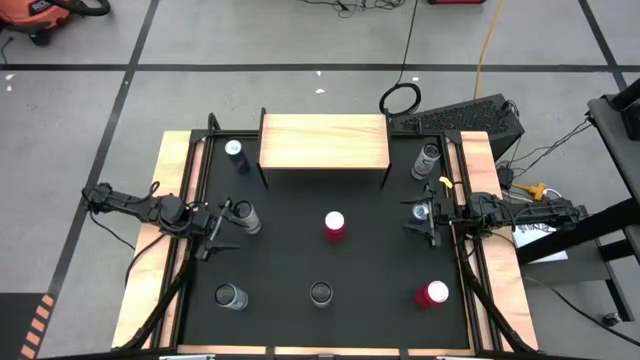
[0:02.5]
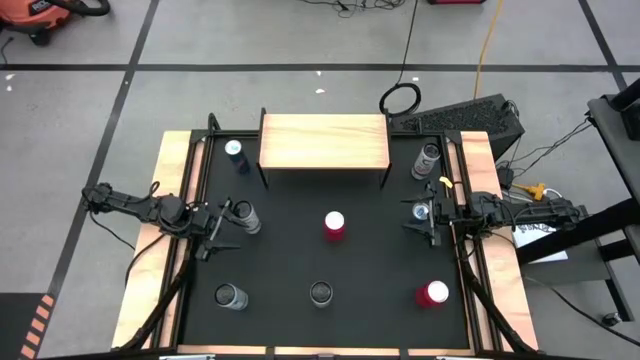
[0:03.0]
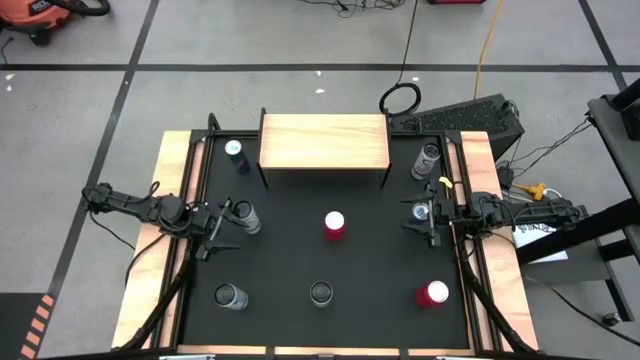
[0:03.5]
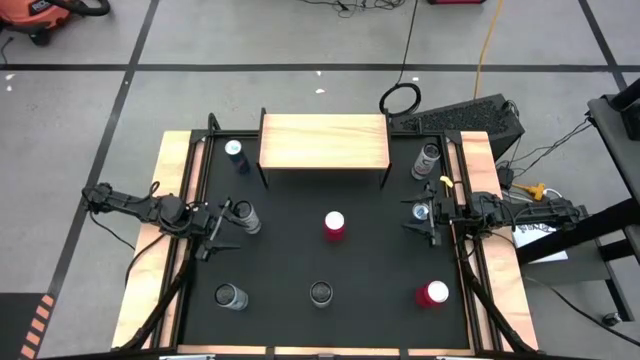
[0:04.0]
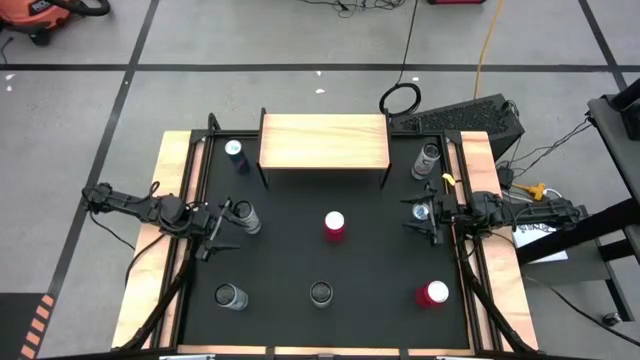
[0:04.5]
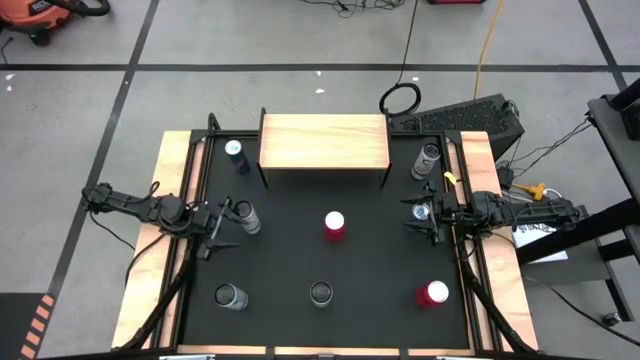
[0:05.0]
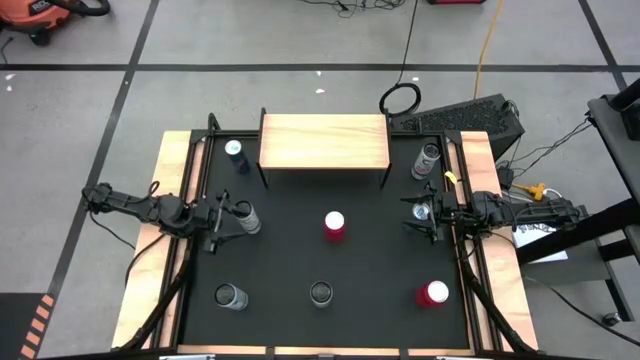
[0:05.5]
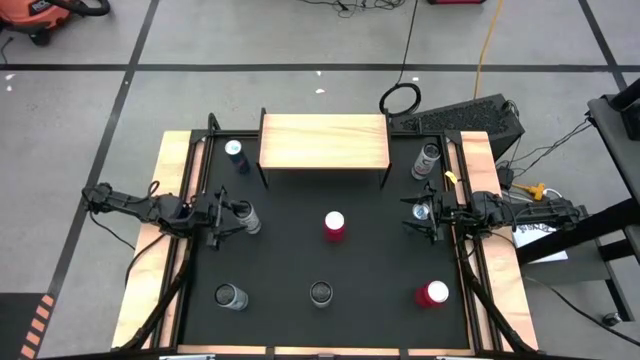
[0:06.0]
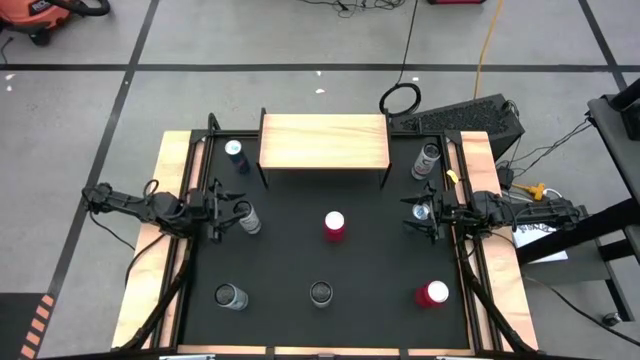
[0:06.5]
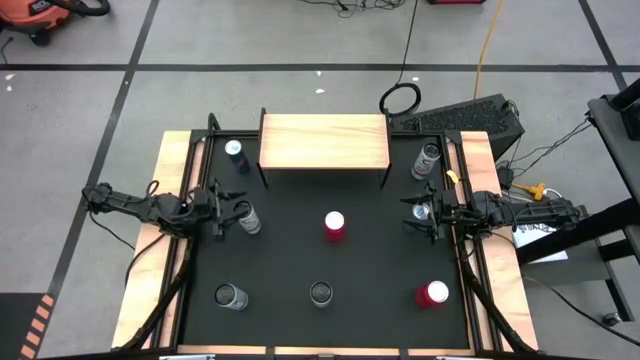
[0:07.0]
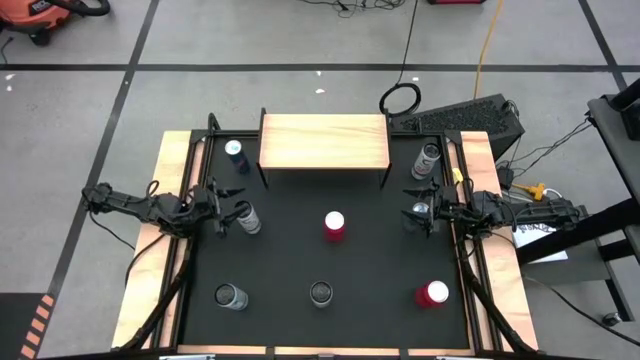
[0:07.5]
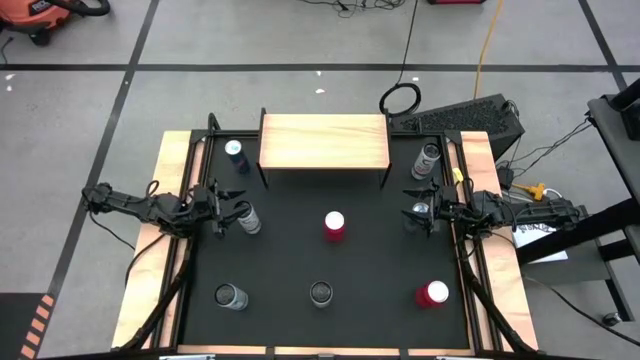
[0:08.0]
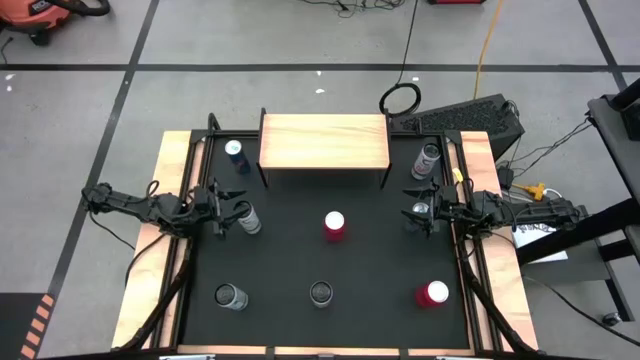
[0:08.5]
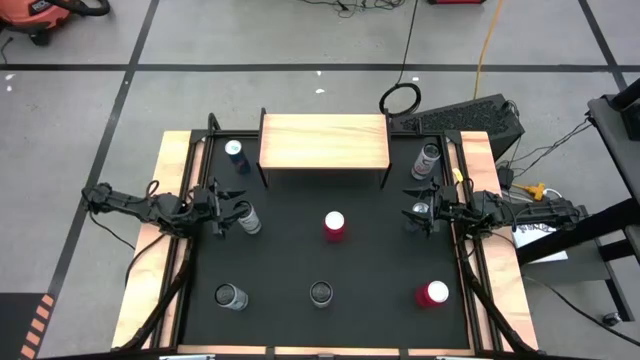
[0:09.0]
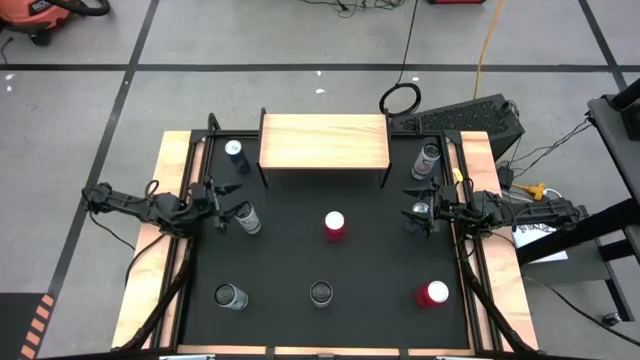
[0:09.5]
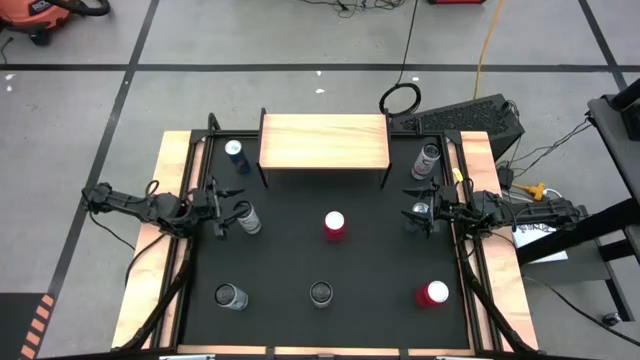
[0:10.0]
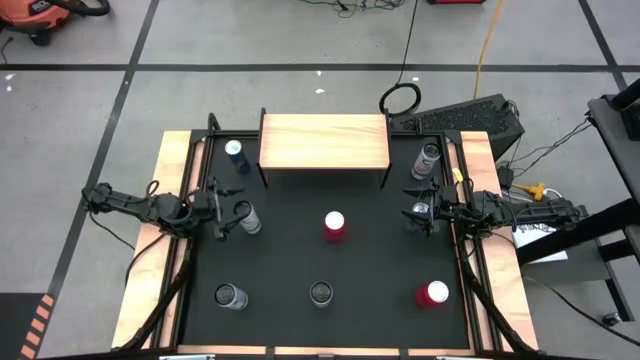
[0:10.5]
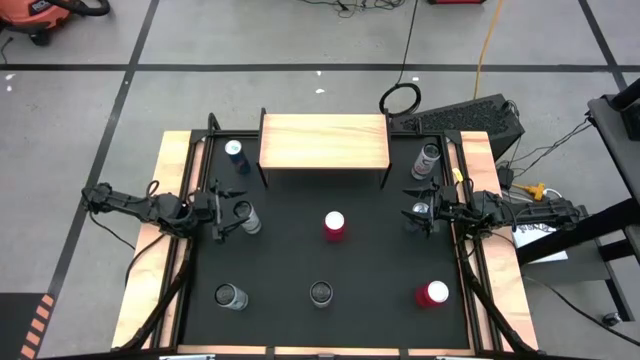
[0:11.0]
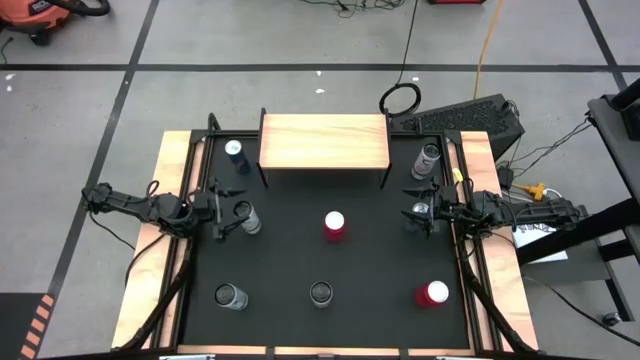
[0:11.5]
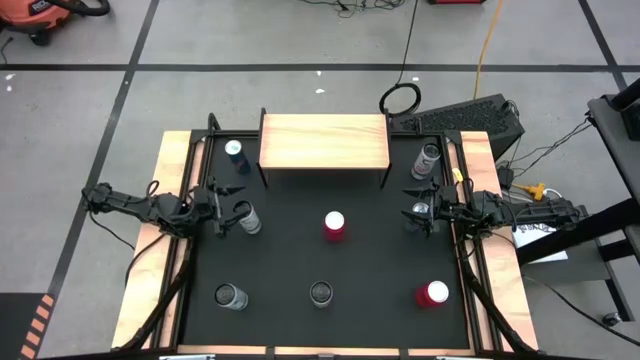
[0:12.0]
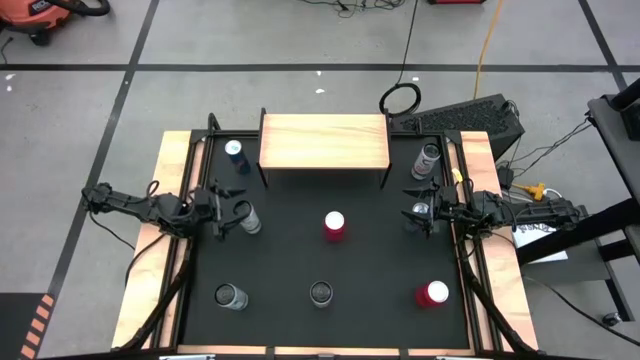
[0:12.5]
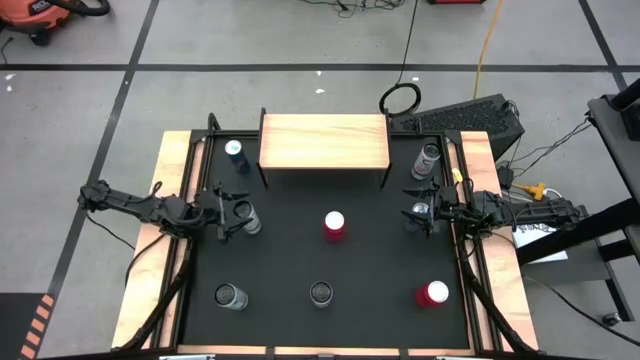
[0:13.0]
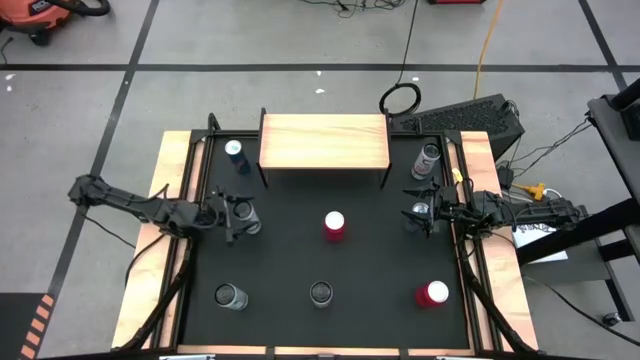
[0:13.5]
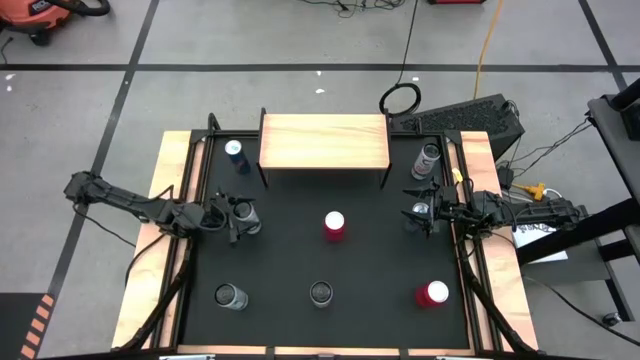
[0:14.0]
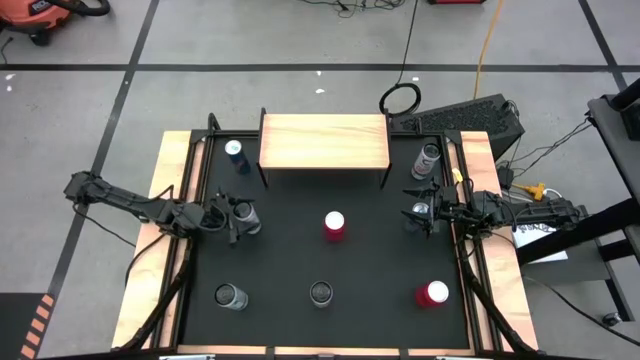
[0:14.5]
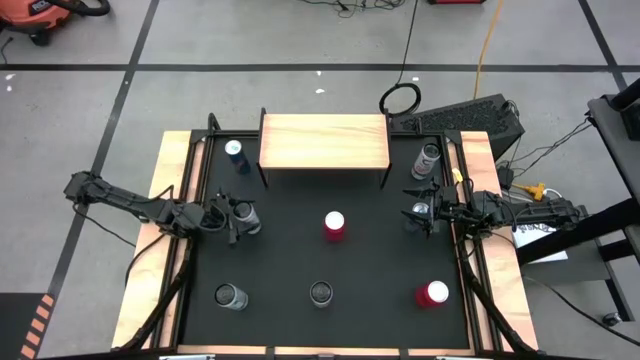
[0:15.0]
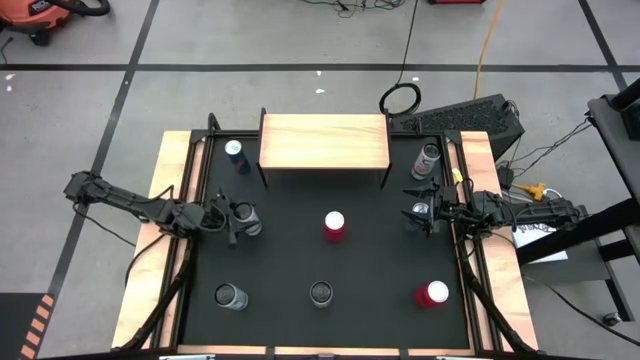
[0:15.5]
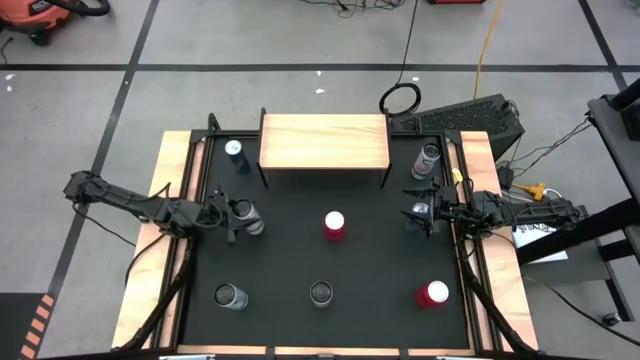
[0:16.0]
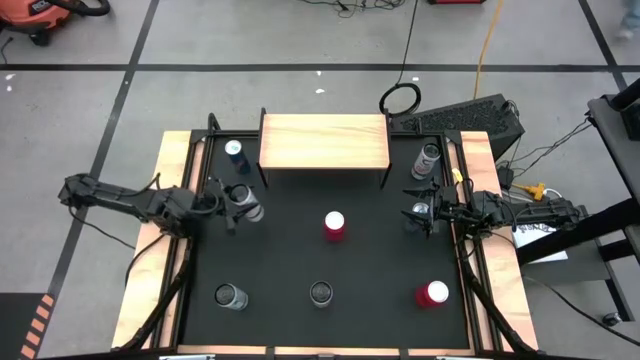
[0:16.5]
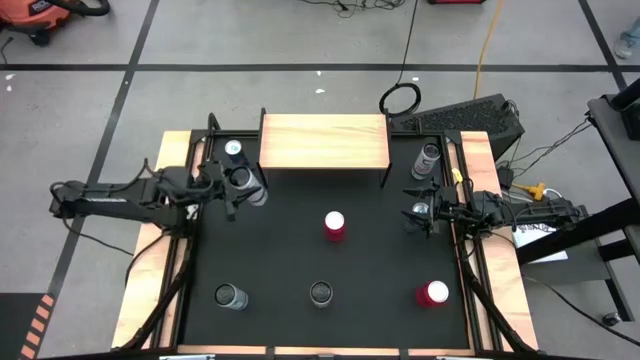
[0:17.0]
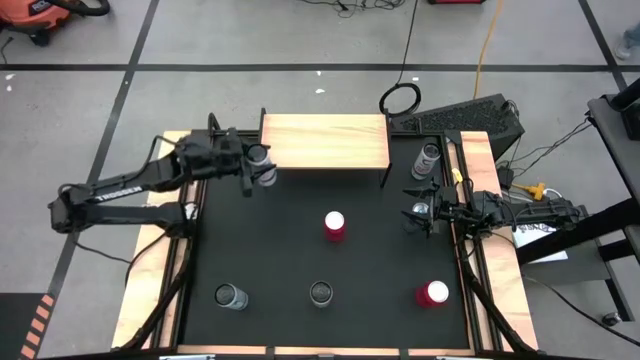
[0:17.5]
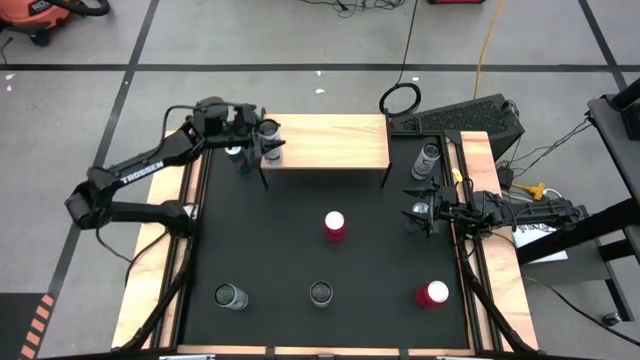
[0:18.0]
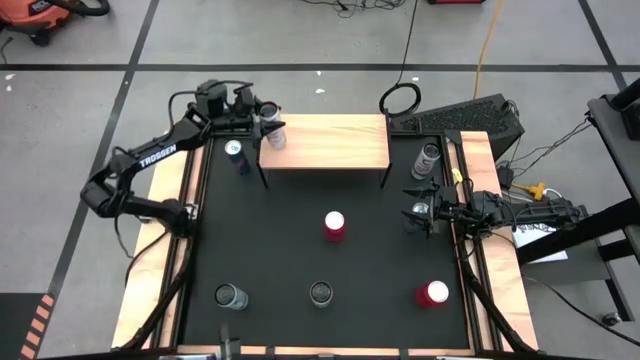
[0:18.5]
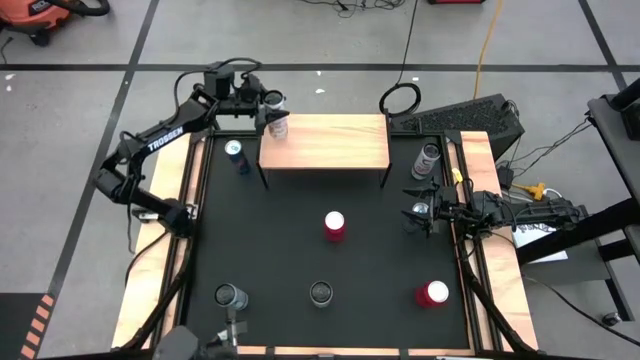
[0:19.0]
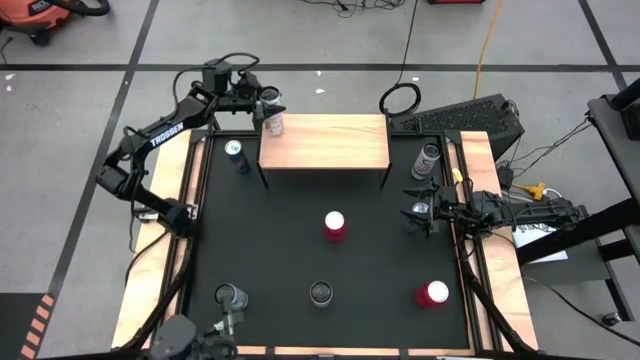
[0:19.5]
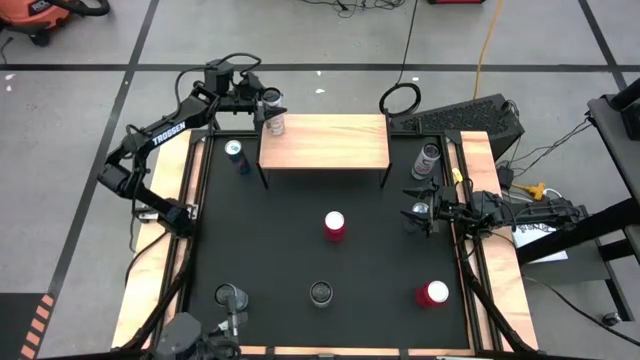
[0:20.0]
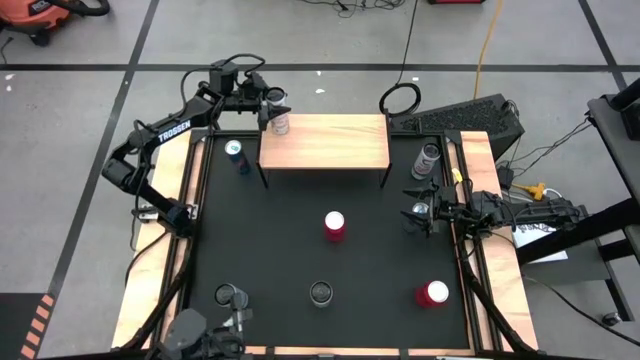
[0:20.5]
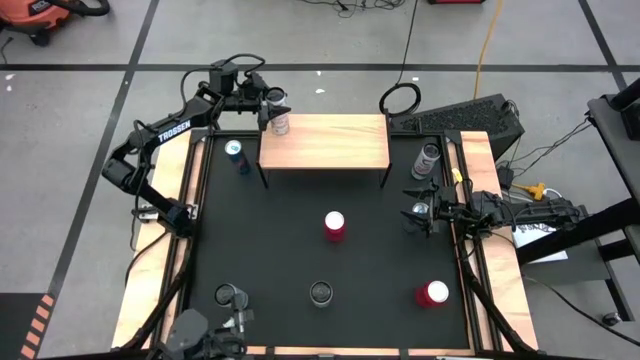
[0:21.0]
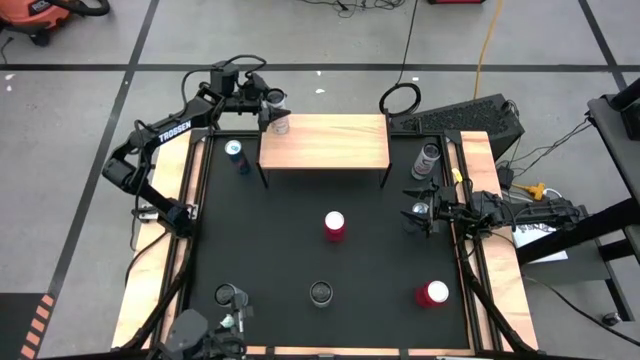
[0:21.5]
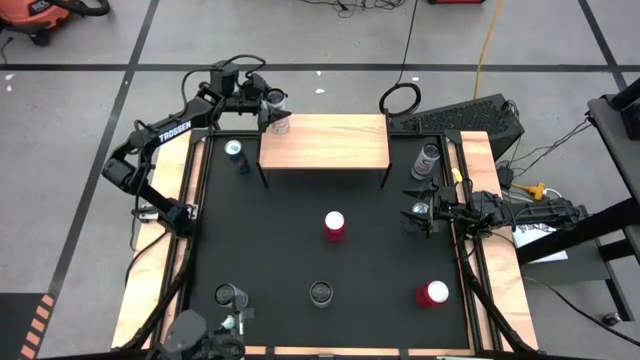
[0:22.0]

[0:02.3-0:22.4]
Task: Place canned beverage on shelf
Put the top white-yellow soda can on the shelf
